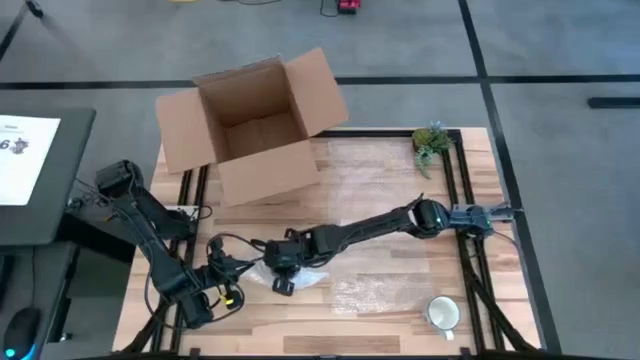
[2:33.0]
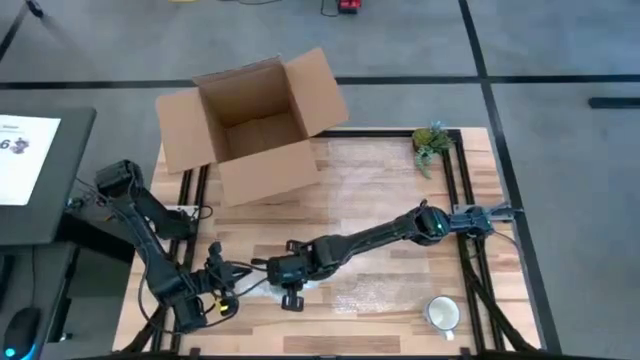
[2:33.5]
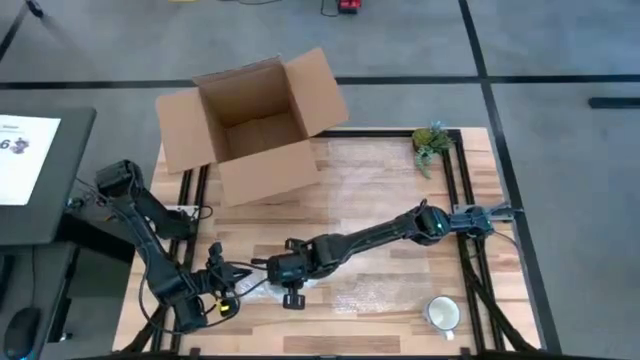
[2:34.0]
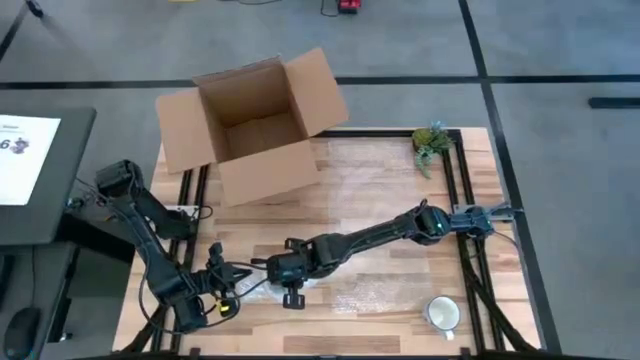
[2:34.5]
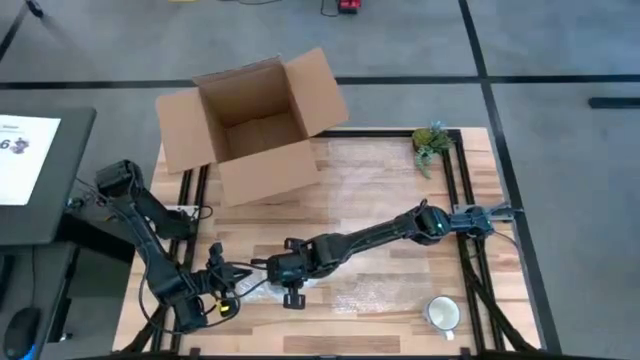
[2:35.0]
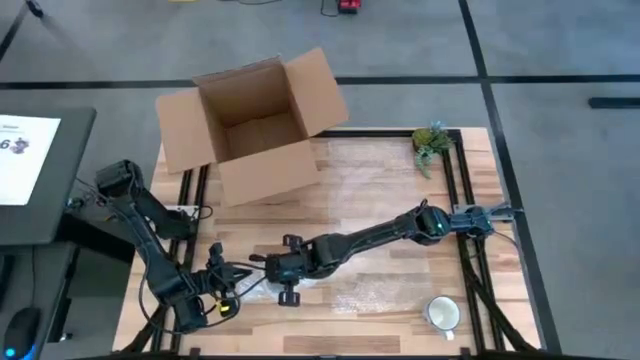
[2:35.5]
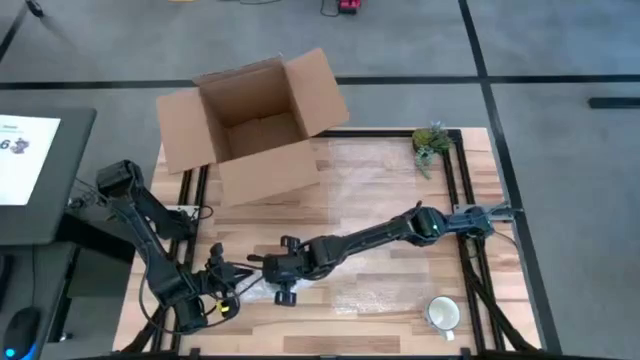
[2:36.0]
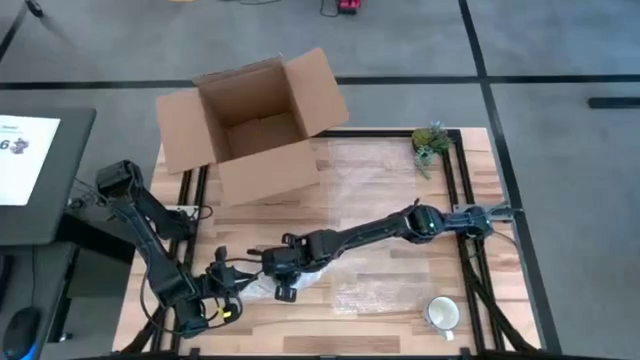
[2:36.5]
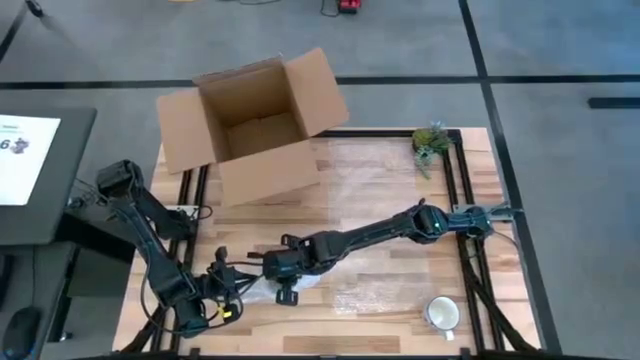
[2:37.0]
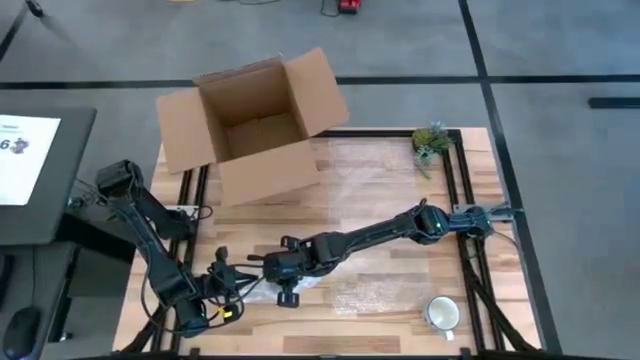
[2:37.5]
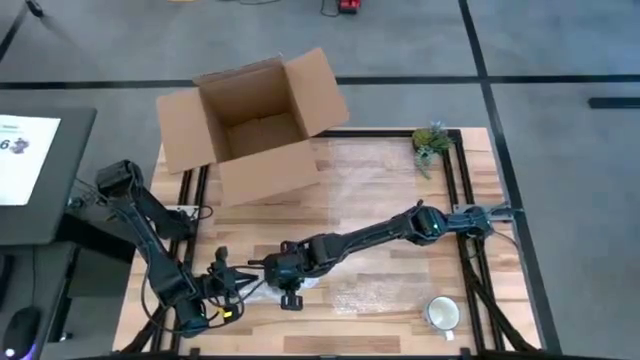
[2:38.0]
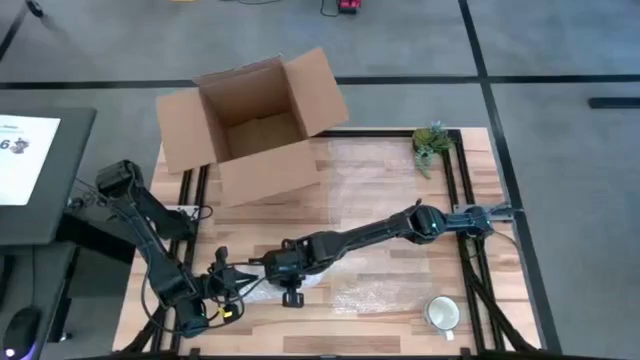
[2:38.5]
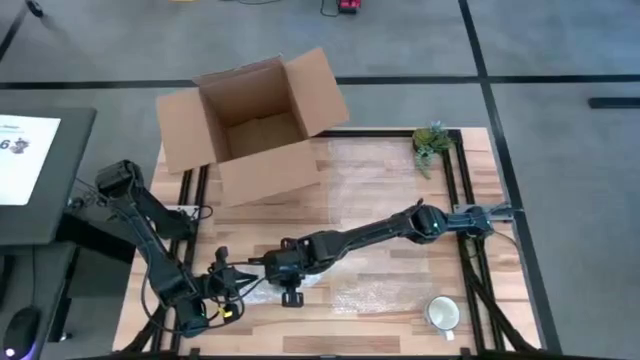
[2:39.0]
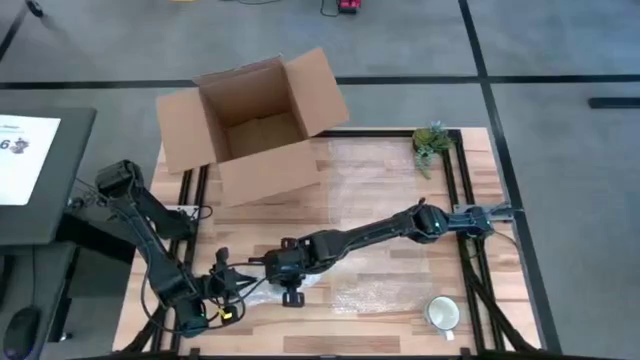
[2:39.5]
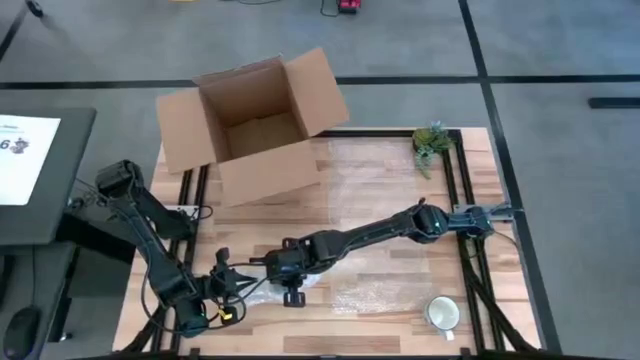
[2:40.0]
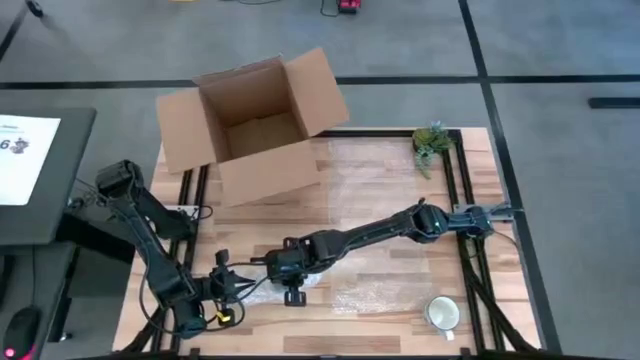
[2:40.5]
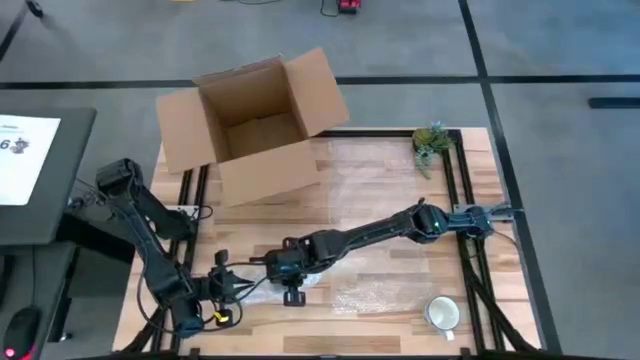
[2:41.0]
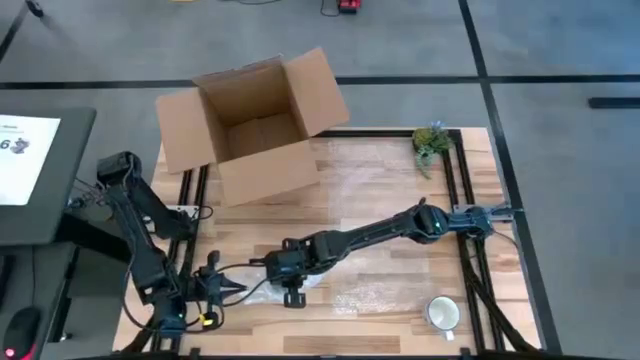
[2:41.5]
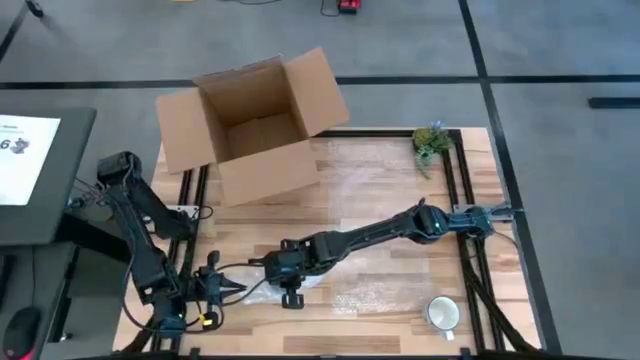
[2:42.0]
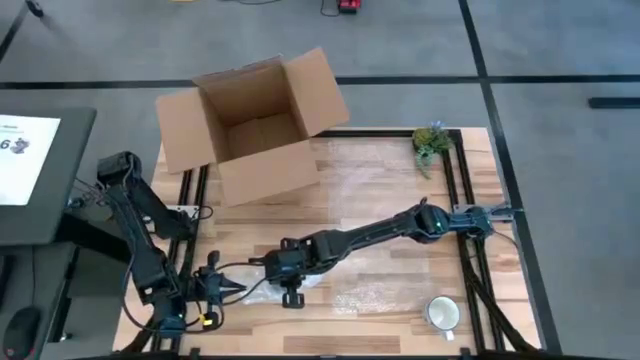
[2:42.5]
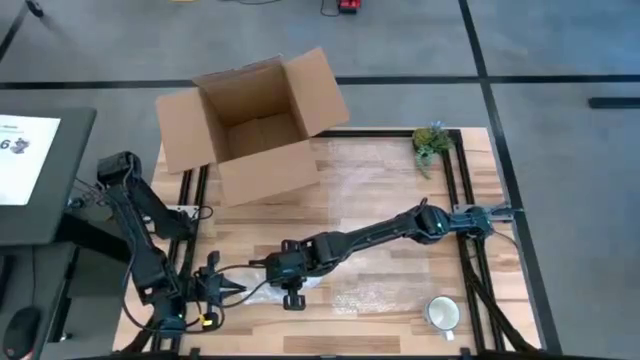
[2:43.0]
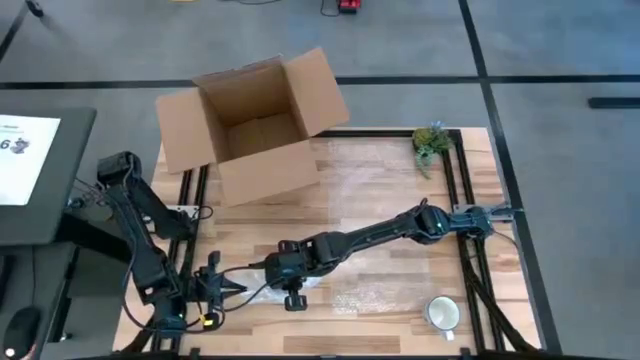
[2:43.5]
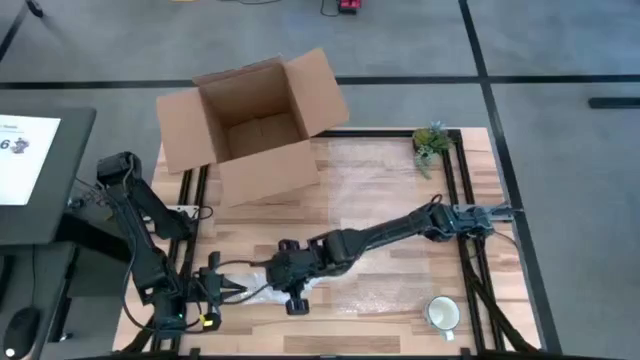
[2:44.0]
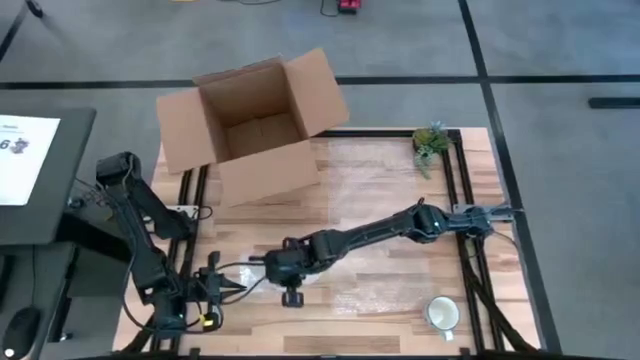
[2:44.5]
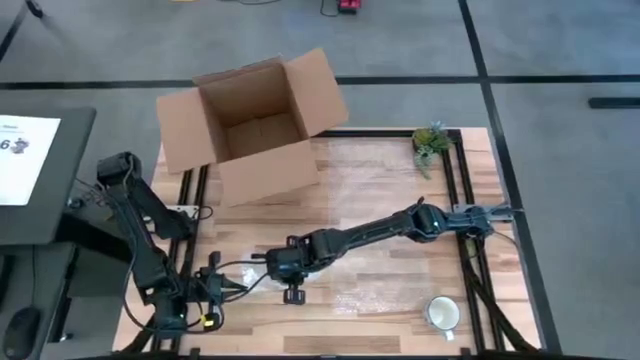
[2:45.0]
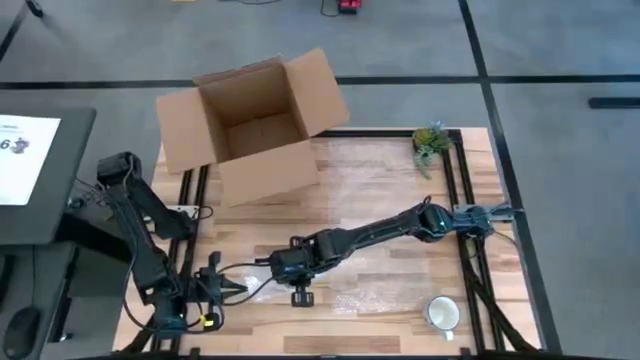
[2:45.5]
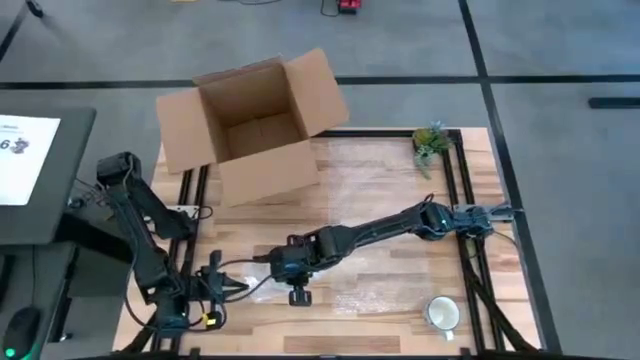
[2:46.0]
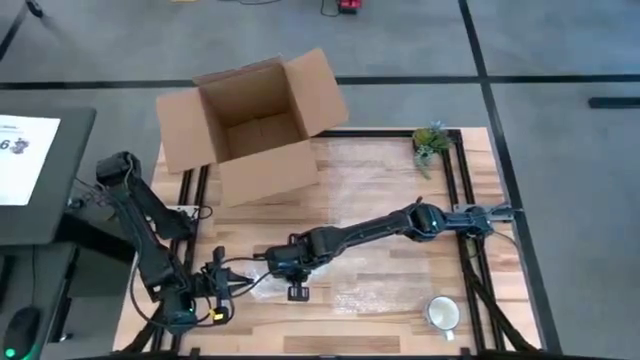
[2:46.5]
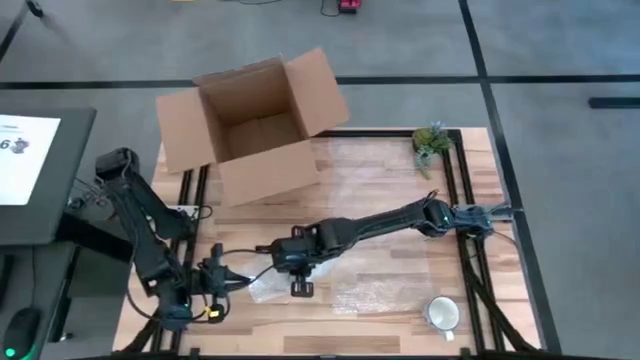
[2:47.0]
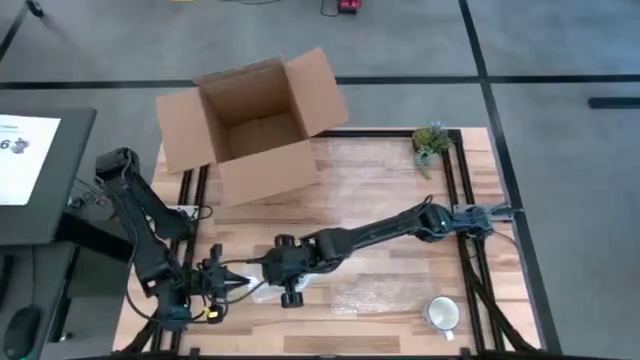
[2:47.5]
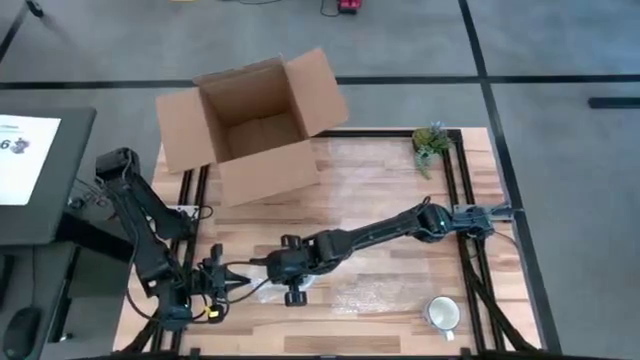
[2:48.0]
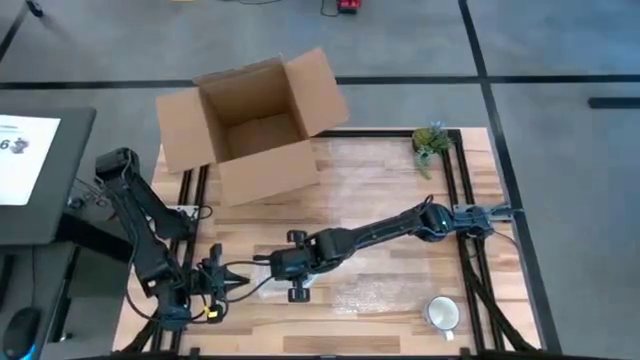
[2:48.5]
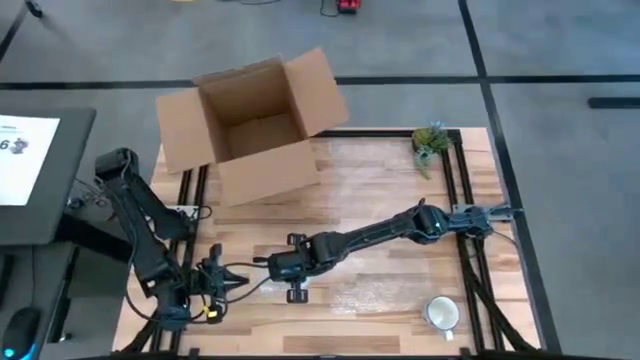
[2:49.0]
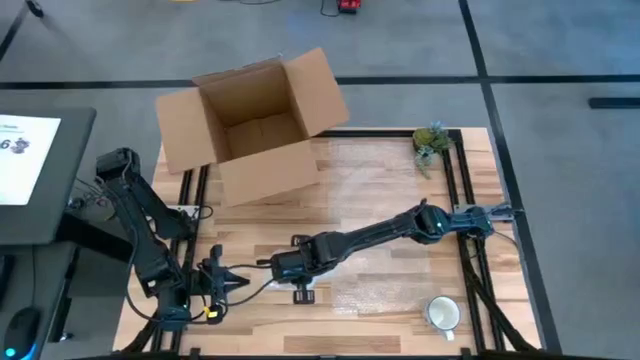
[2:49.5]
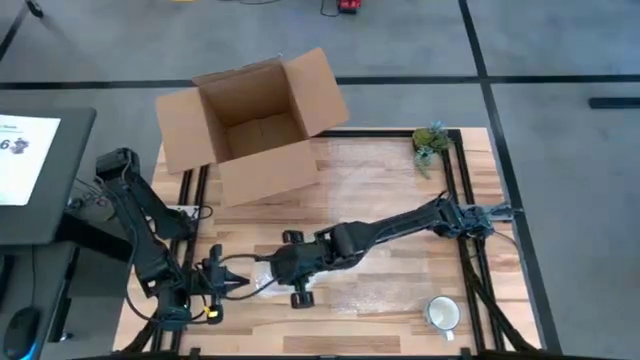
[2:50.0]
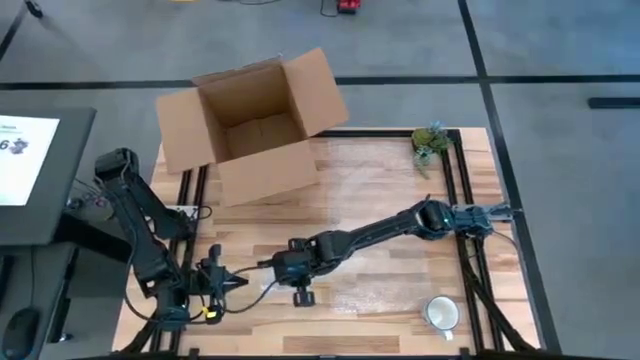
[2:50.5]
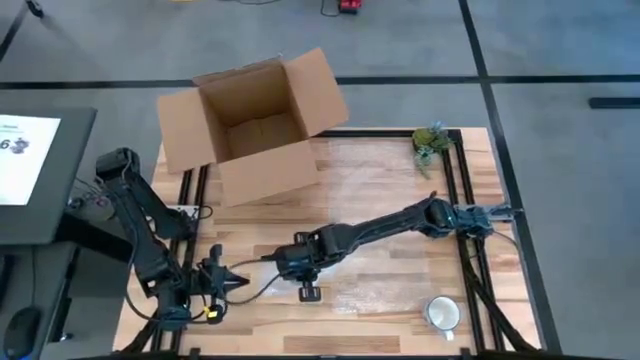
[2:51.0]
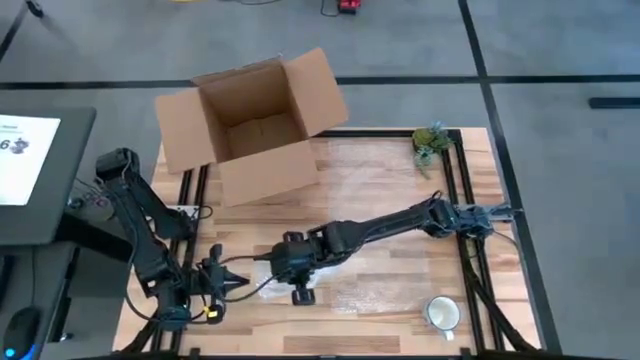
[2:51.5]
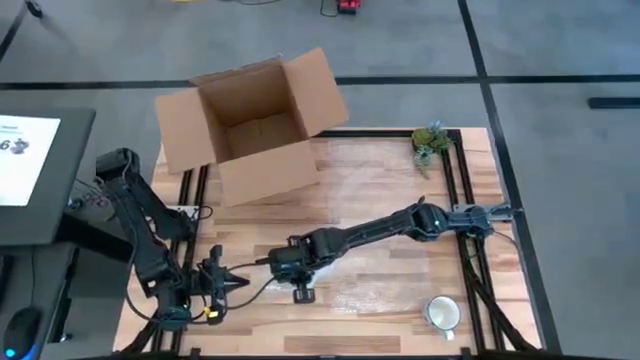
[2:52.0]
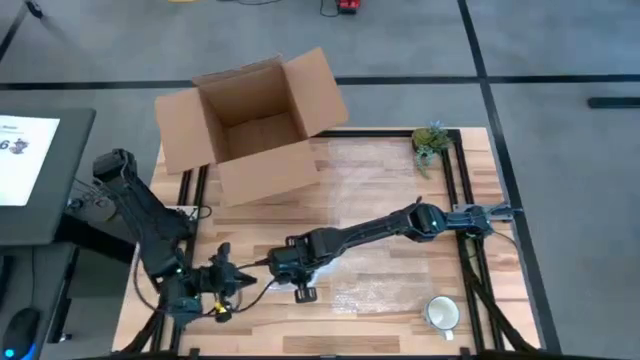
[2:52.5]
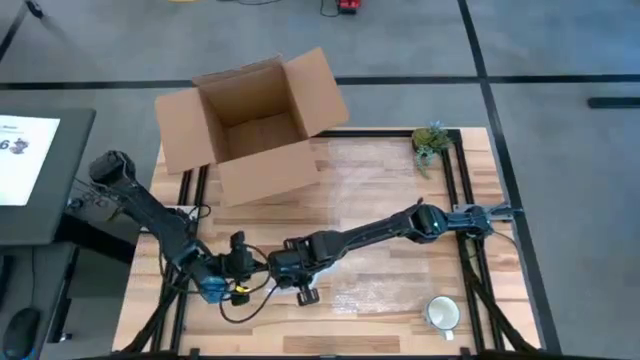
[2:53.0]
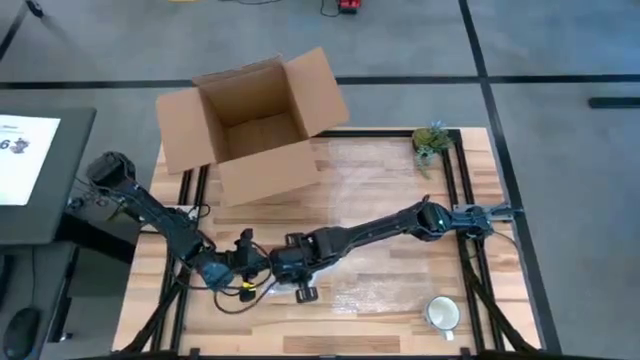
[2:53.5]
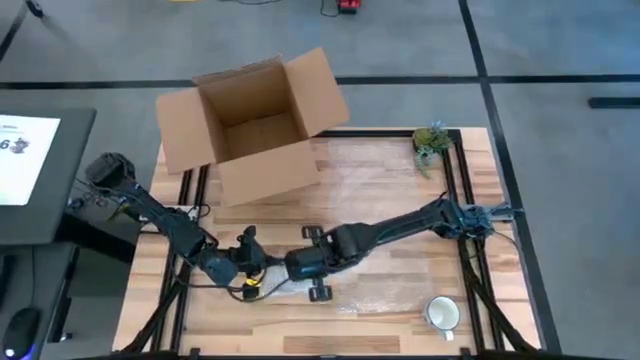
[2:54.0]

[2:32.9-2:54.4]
Task: wrap mug
Wrap the green patterned mug with the bubble wrap
